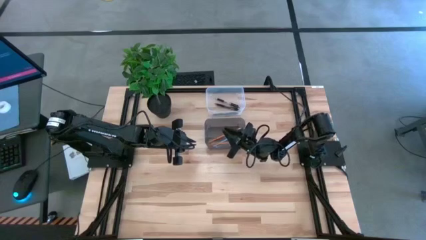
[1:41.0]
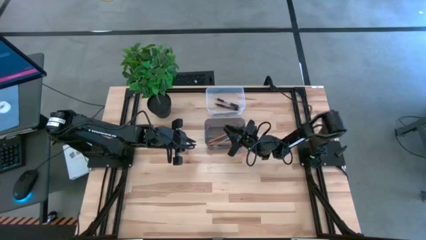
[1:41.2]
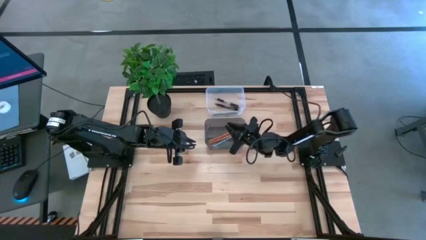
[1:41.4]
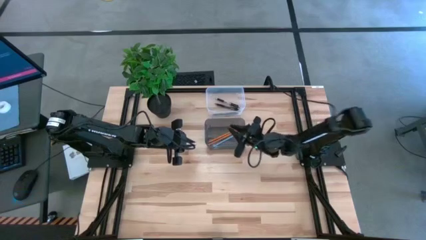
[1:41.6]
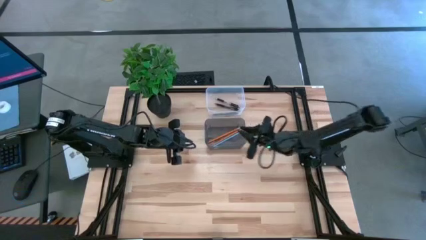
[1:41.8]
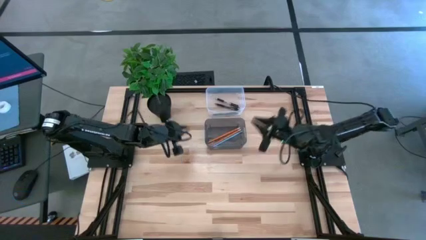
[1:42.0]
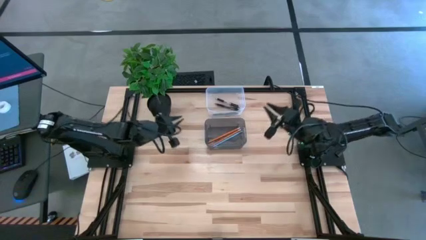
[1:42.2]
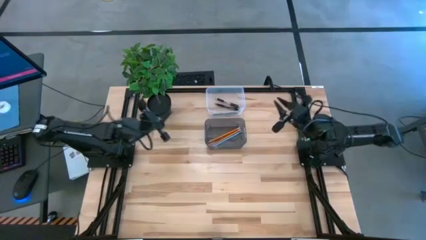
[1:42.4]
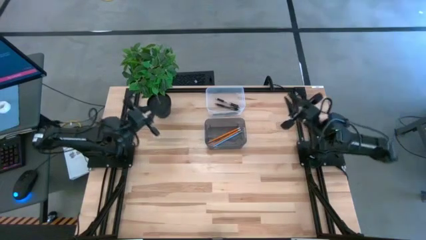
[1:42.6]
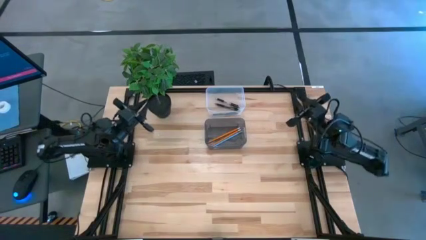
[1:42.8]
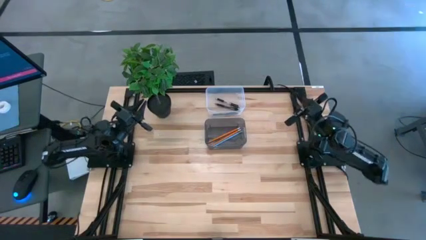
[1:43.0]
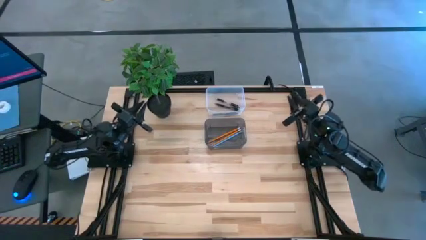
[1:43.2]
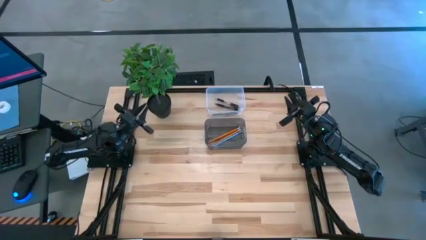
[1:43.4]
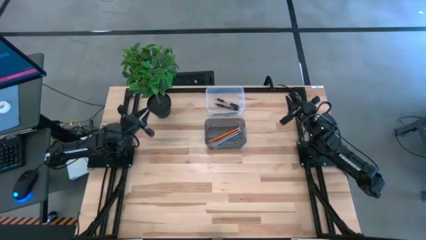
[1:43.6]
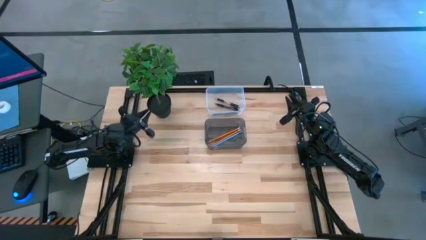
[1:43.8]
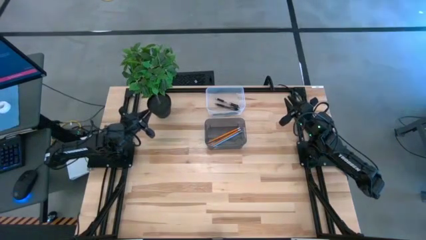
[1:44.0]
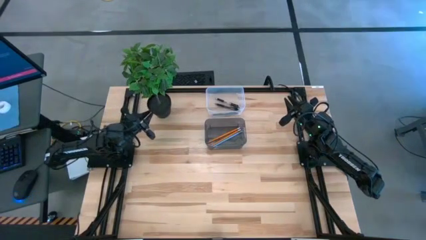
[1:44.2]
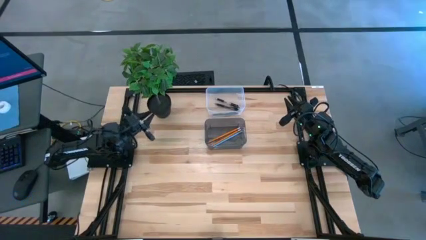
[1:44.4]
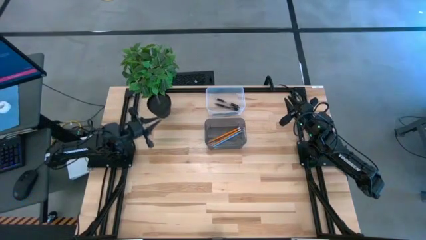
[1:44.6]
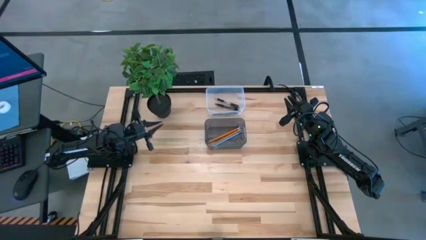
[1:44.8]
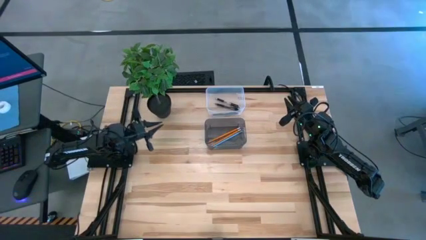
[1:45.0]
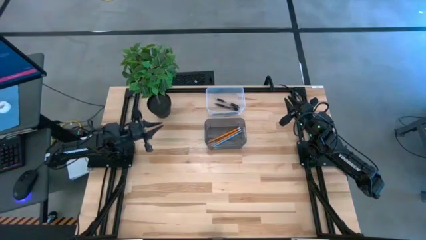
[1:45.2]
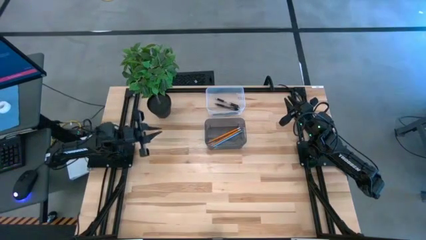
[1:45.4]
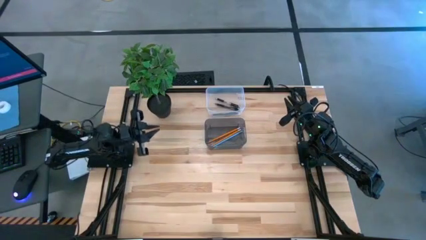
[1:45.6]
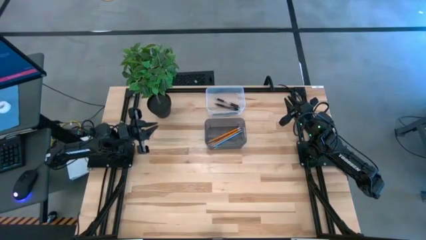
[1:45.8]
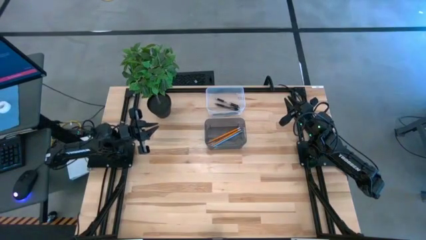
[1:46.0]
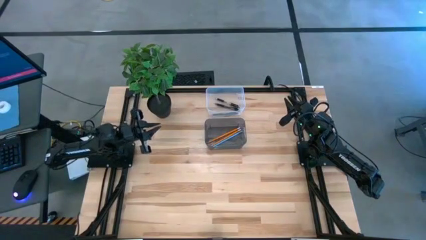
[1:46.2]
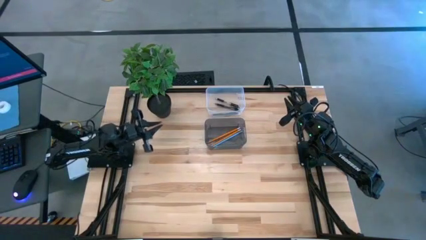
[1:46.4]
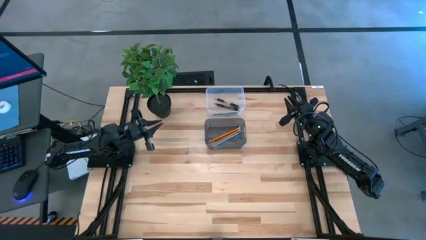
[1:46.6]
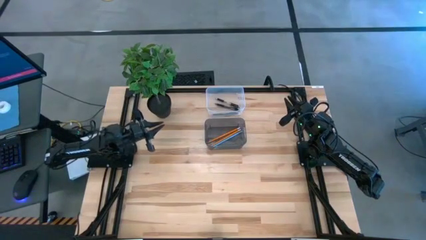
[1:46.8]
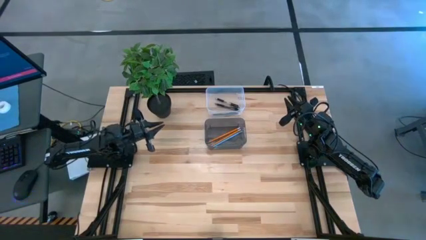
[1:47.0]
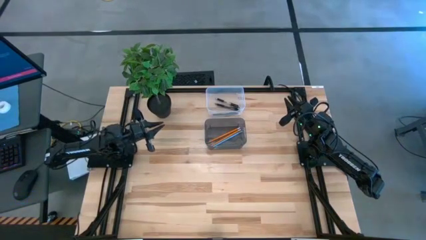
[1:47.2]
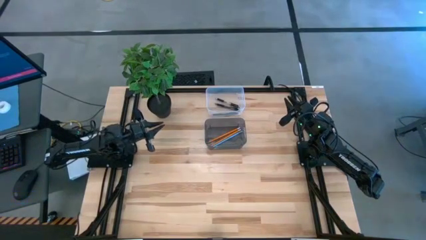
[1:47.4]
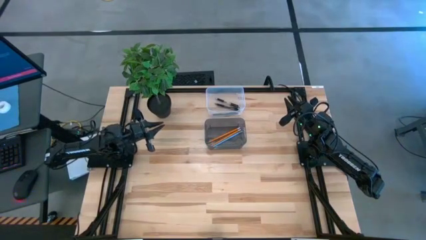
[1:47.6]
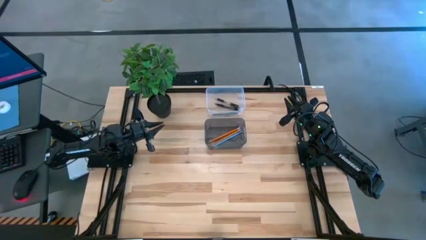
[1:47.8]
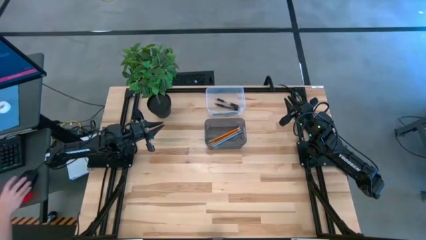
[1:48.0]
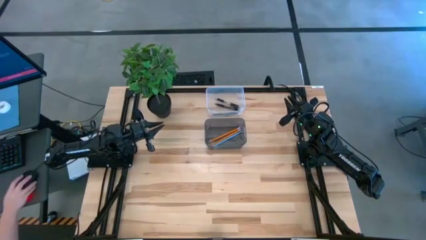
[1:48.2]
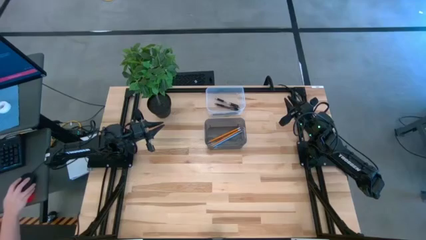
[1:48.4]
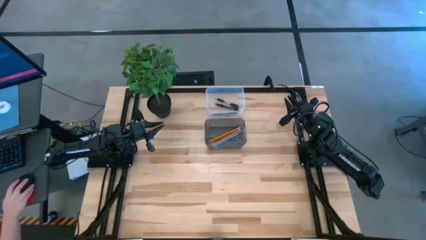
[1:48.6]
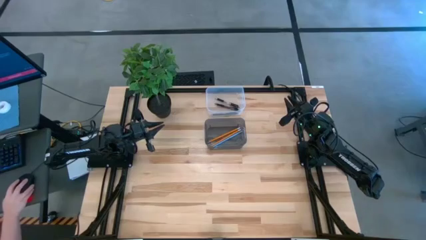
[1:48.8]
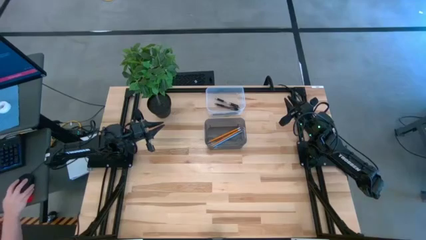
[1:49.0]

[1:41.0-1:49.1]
Task: Sort pens & pencils
Return to Home Position

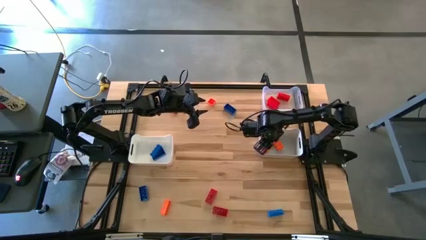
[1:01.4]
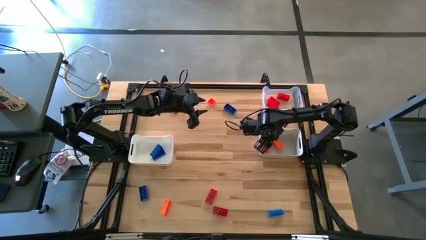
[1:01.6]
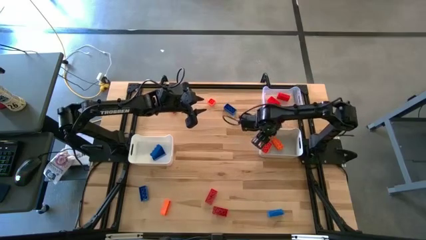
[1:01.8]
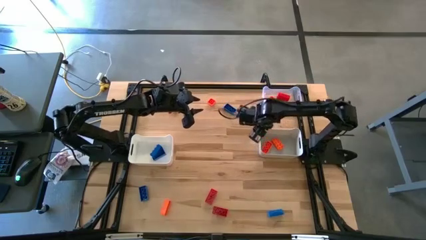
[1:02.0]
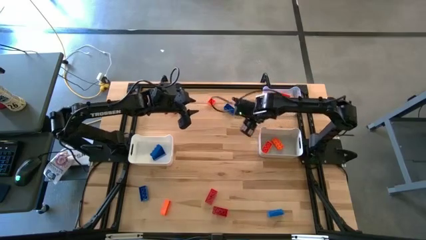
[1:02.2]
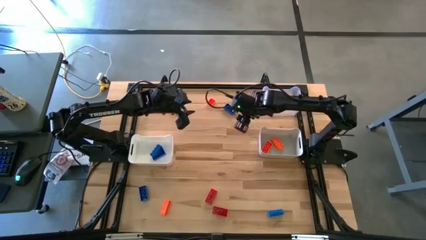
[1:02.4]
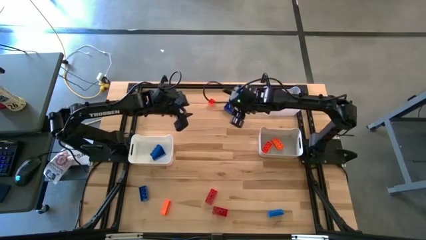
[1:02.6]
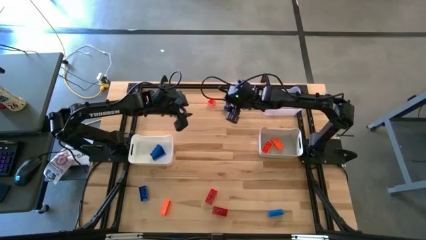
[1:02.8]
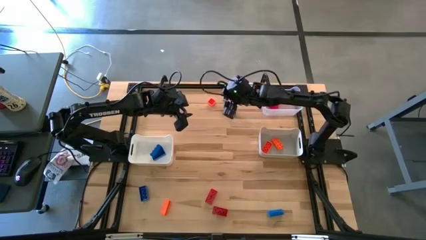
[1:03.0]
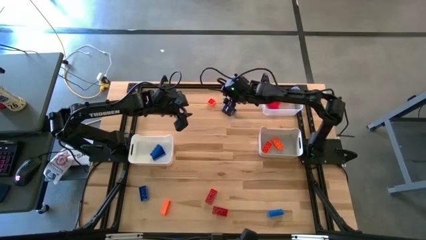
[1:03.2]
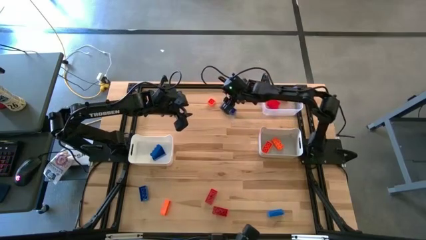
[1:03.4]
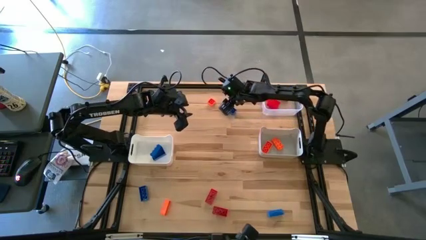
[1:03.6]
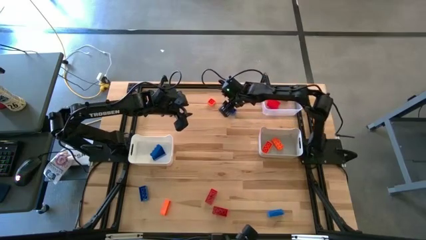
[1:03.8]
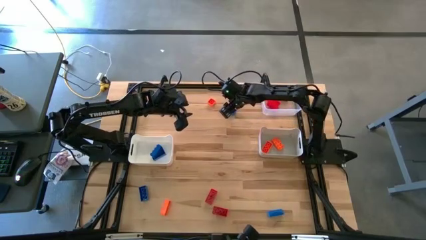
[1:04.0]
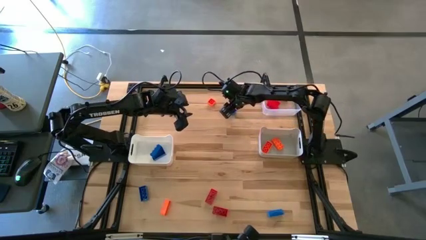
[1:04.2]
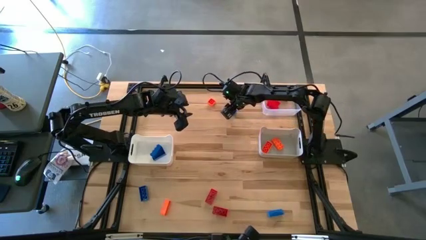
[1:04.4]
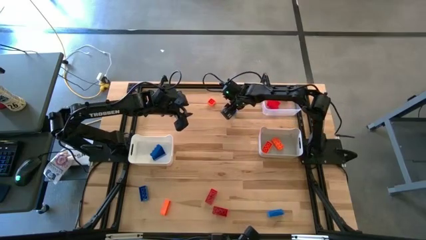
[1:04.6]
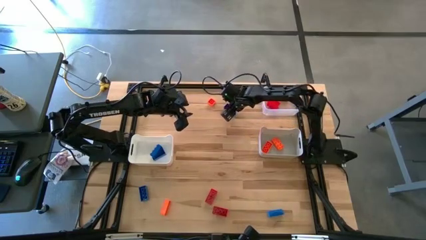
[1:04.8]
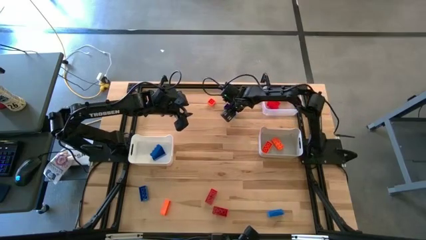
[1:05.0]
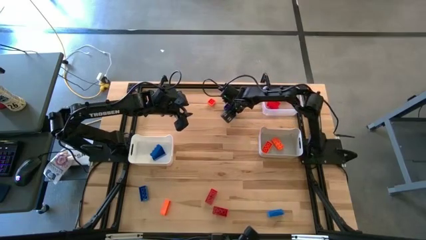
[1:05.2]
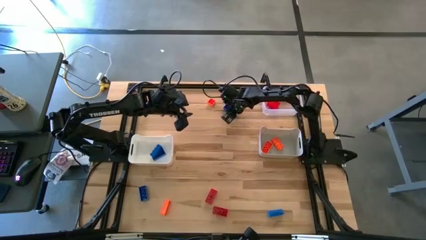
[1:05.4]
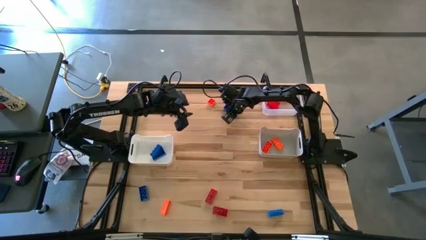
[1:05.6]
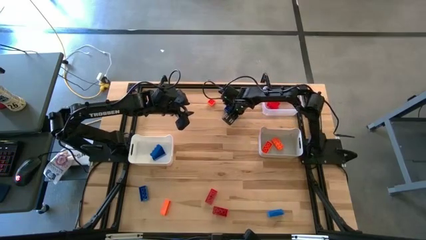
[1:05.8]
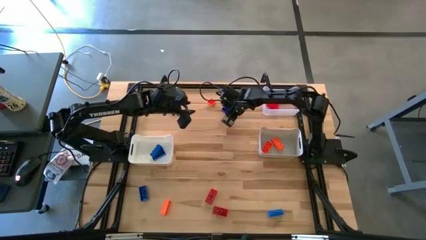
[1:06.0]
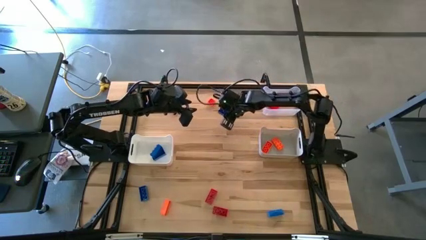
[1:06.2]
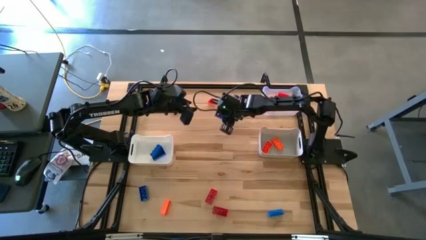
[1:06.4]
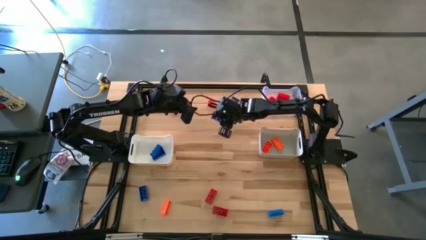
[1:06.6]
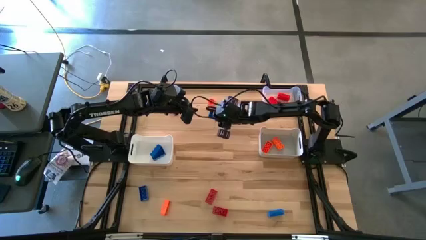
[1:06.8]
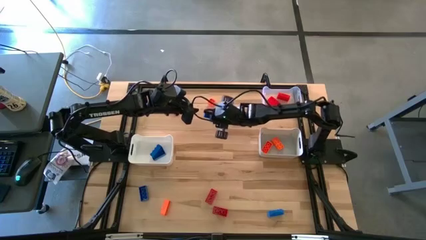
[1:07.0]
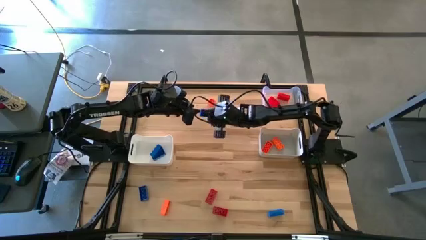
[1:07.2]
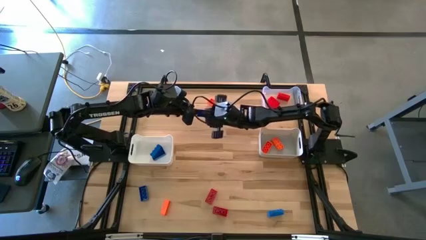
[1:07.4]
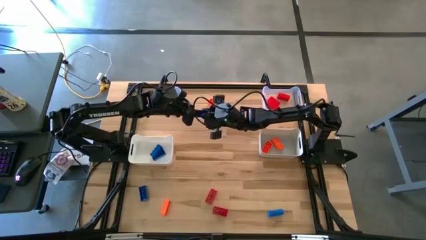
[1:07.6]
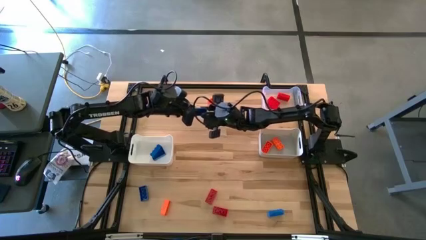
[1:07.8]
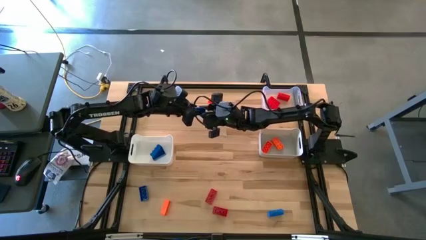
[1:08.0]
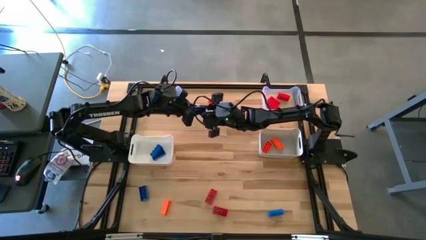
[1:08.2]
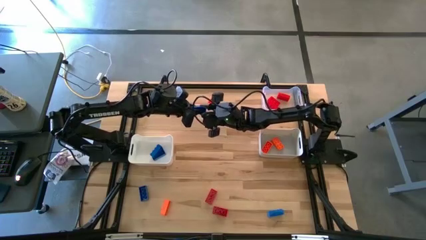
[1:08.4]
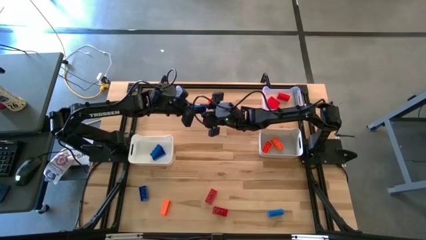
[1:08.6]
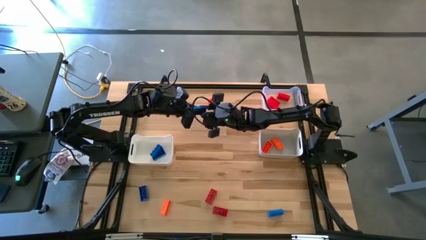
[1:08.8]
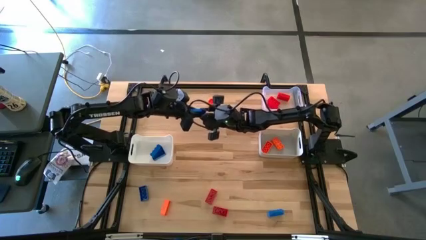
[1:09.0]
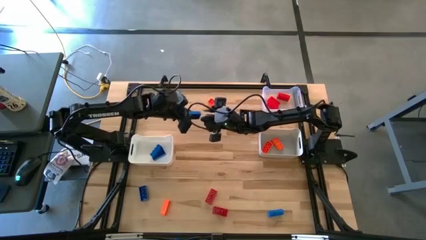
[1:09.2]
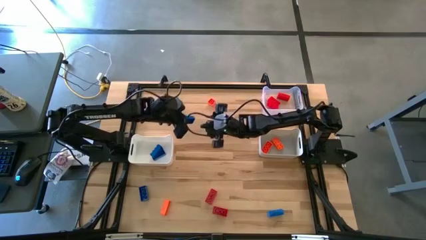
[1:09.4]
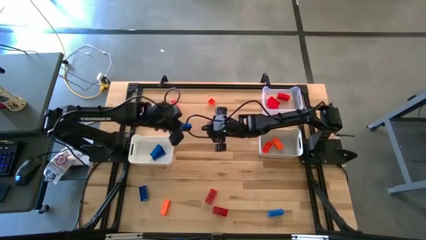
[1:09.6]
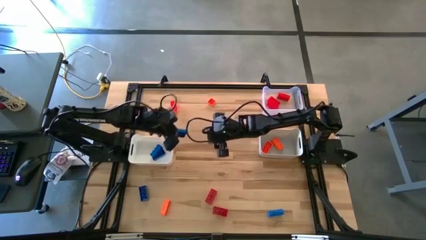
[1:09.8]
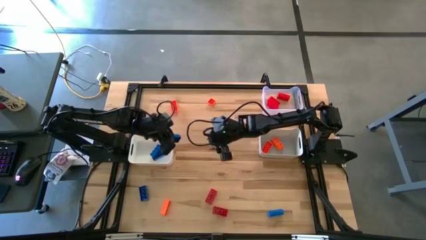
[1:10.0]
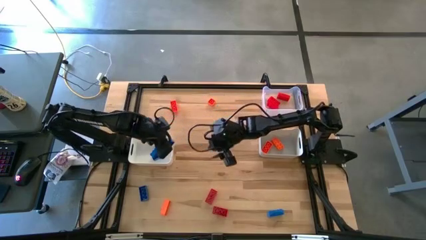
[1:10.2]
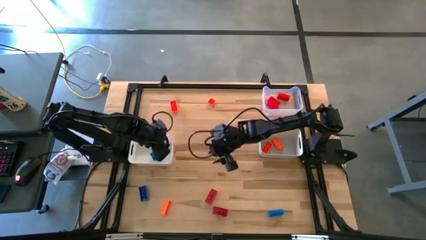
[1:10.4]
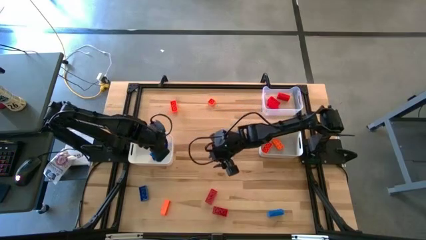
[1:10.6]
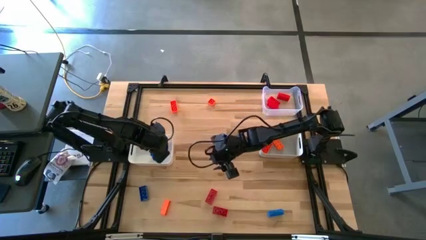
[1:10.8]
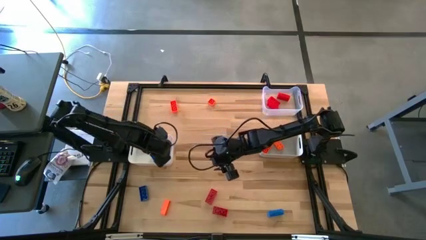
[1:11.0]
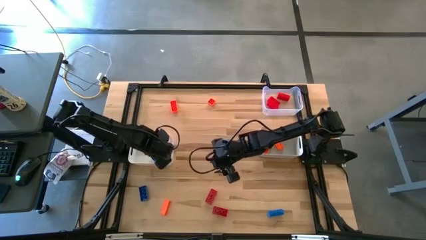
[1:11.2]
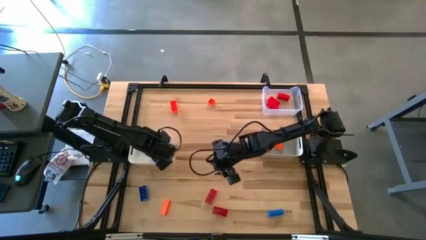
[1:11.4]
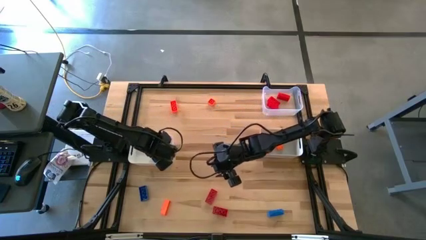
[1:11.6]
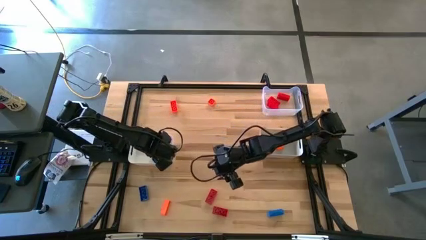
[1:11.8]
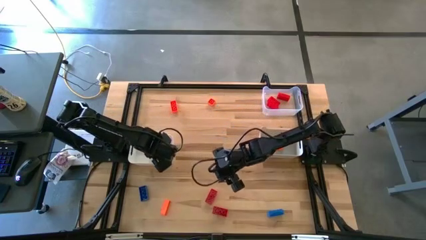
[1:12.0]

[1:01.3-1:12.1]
Task: Sort & place blocks by color
Put the blue game piece into the white bin
